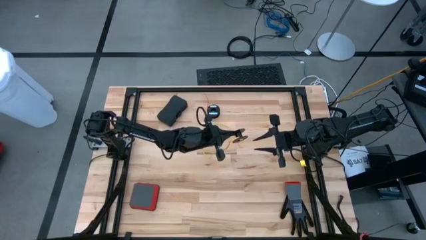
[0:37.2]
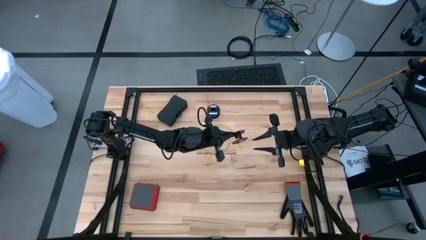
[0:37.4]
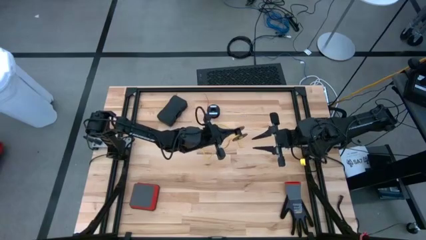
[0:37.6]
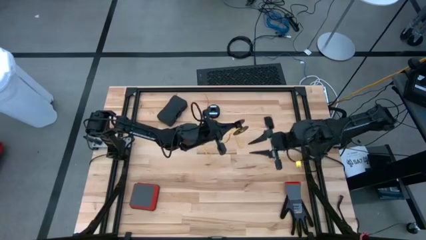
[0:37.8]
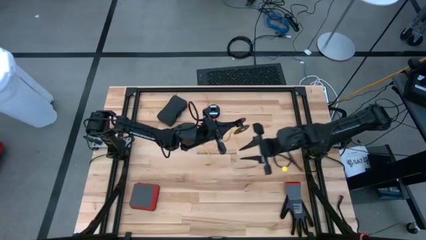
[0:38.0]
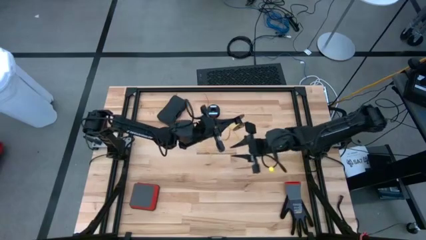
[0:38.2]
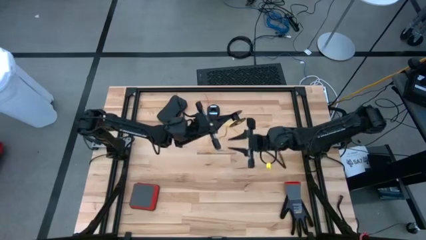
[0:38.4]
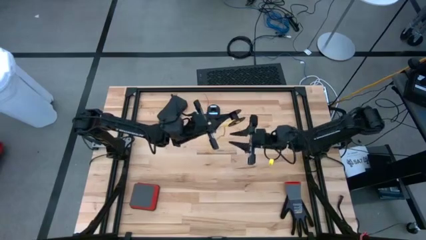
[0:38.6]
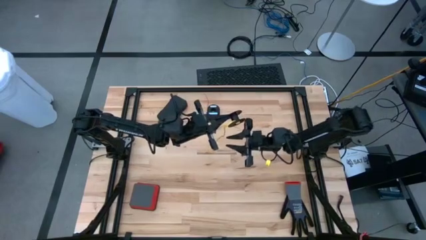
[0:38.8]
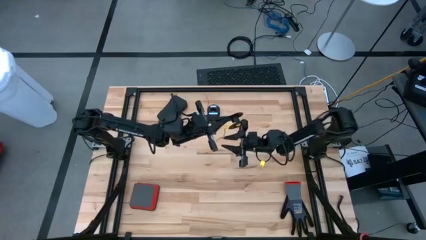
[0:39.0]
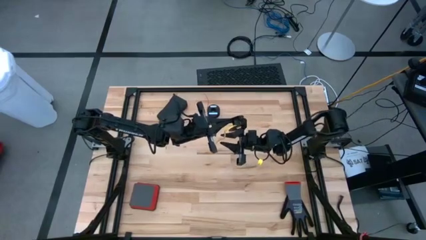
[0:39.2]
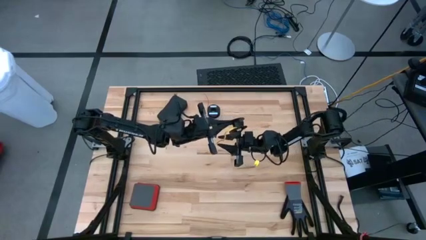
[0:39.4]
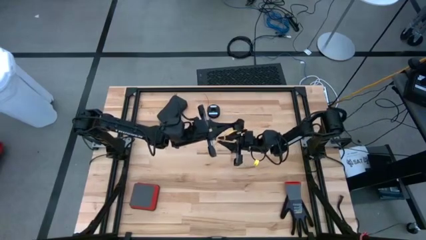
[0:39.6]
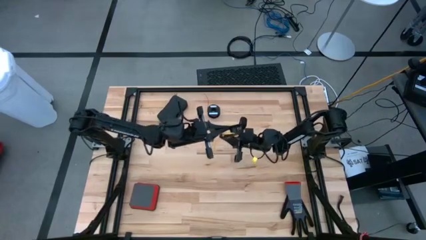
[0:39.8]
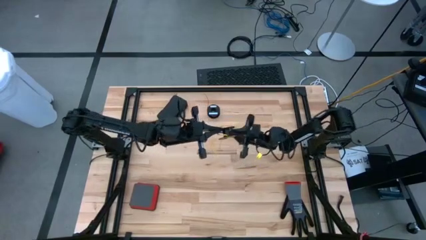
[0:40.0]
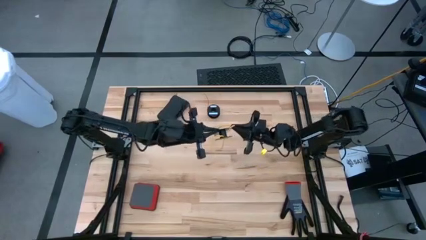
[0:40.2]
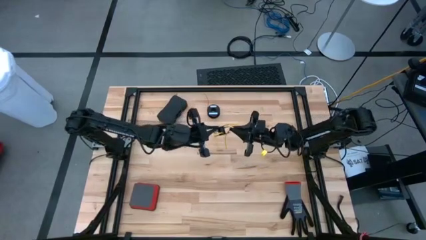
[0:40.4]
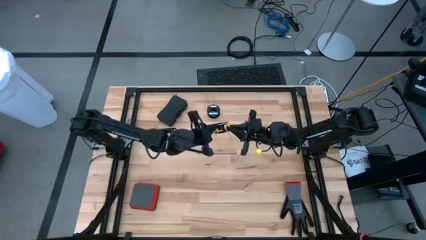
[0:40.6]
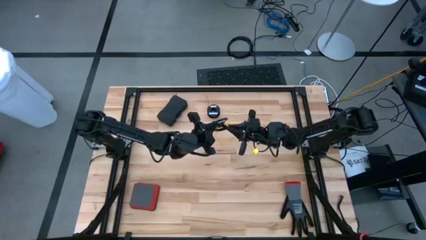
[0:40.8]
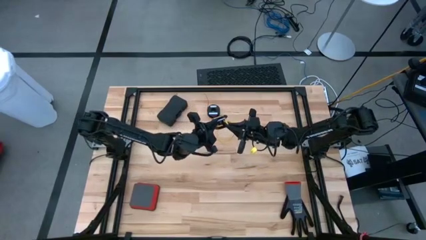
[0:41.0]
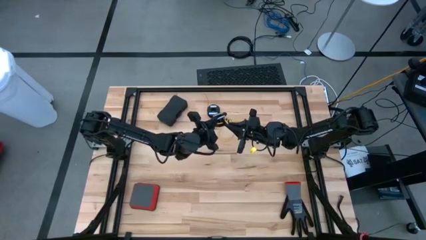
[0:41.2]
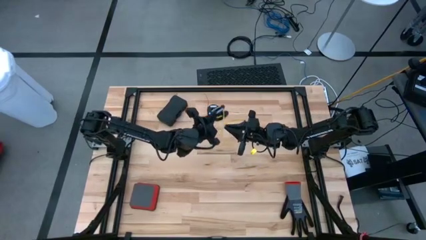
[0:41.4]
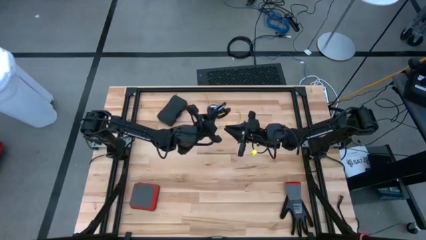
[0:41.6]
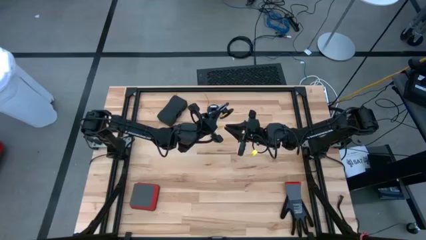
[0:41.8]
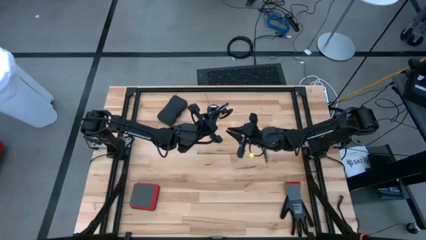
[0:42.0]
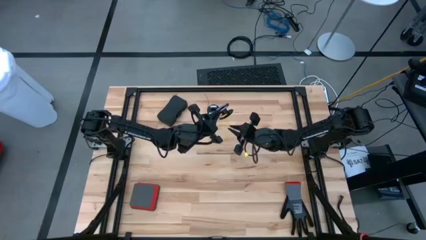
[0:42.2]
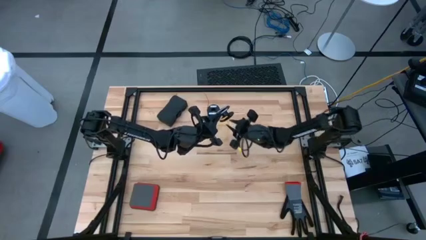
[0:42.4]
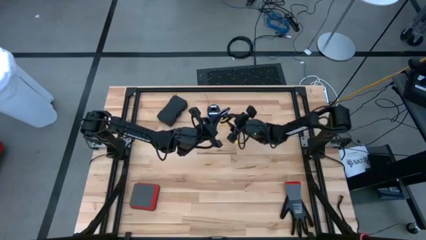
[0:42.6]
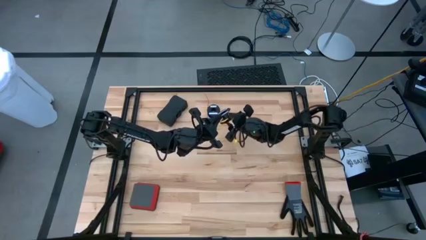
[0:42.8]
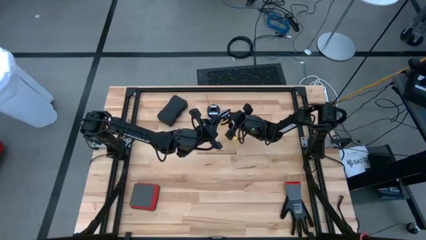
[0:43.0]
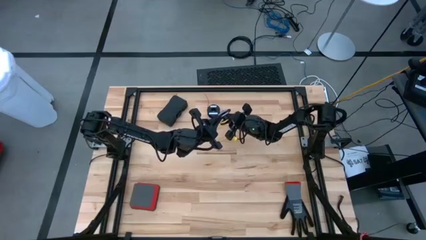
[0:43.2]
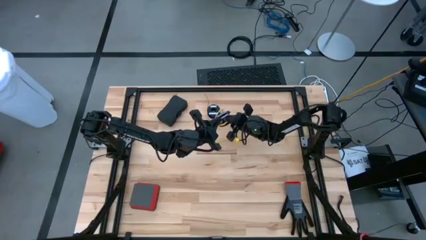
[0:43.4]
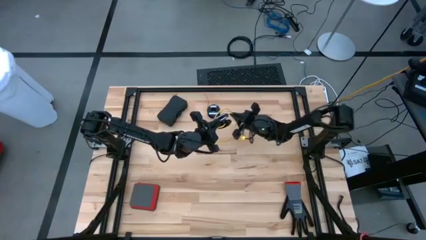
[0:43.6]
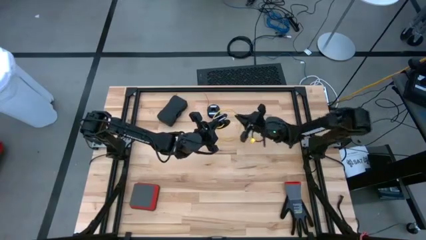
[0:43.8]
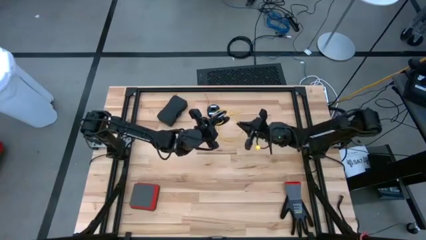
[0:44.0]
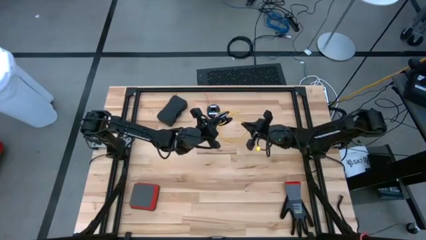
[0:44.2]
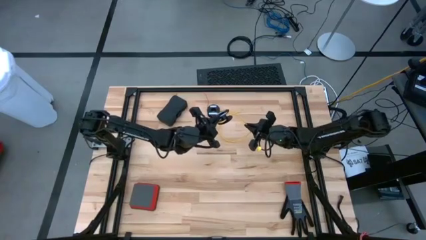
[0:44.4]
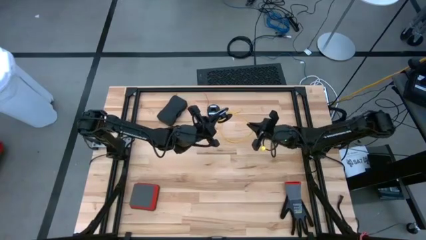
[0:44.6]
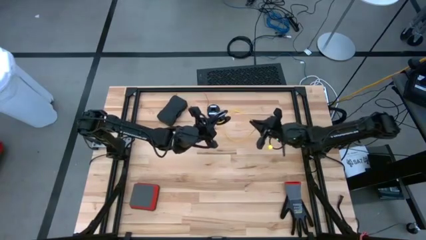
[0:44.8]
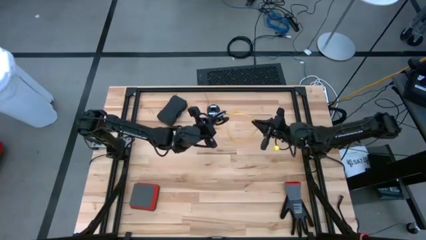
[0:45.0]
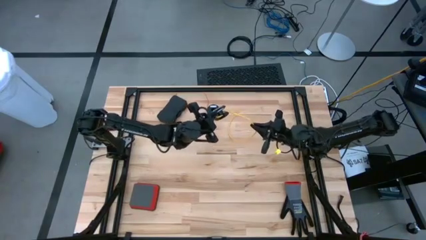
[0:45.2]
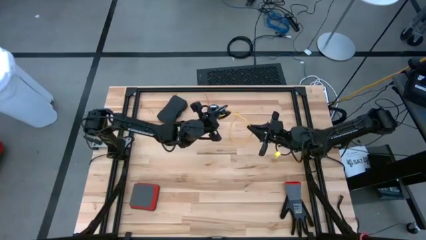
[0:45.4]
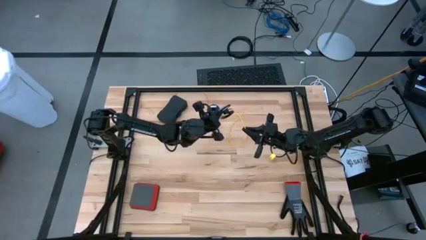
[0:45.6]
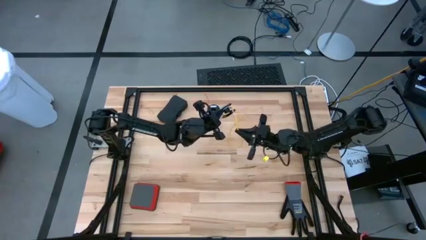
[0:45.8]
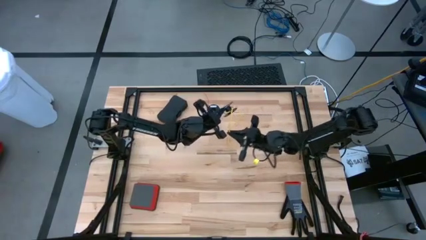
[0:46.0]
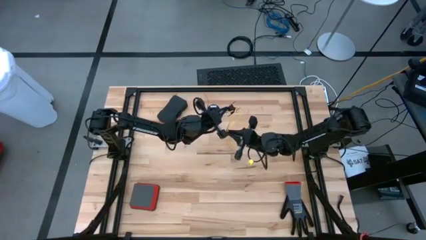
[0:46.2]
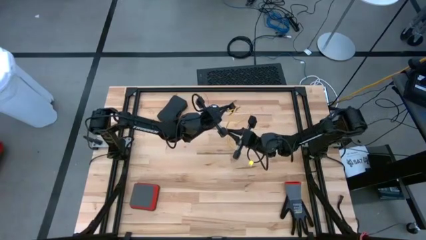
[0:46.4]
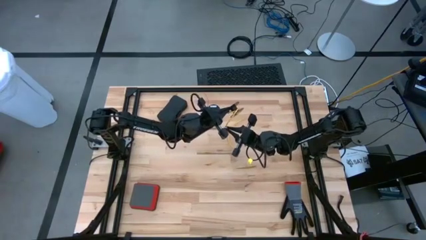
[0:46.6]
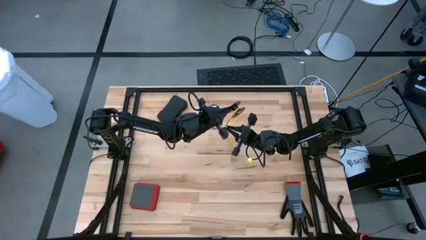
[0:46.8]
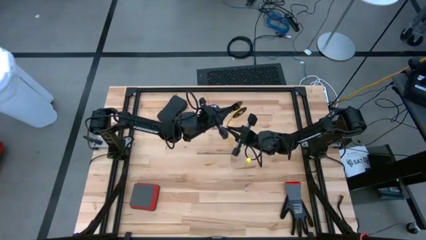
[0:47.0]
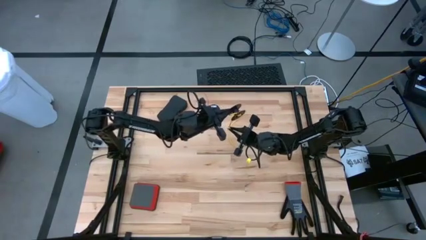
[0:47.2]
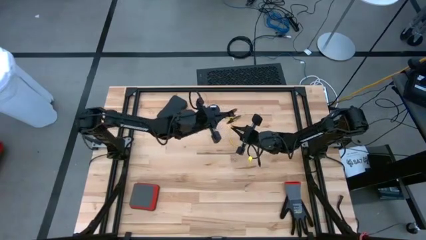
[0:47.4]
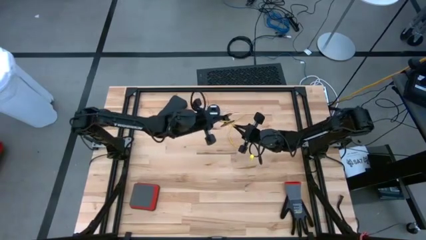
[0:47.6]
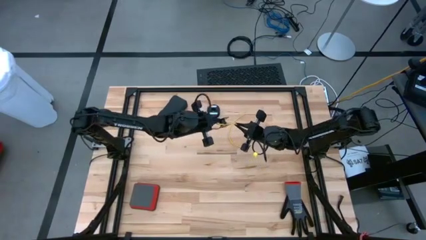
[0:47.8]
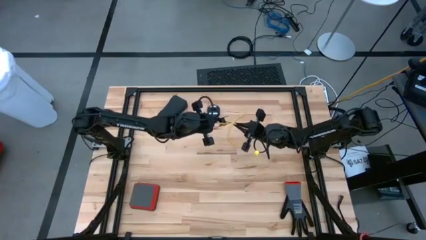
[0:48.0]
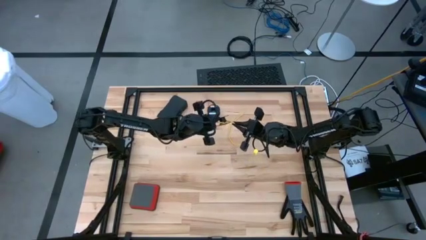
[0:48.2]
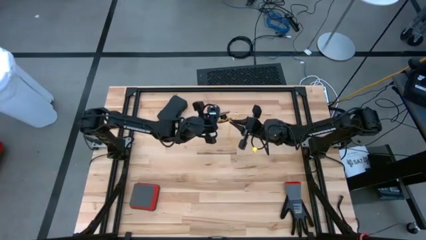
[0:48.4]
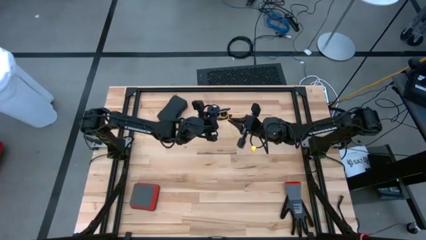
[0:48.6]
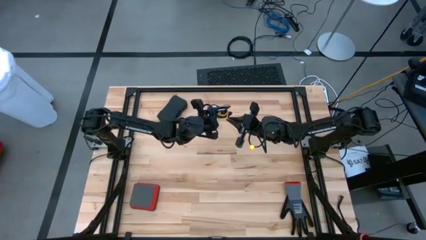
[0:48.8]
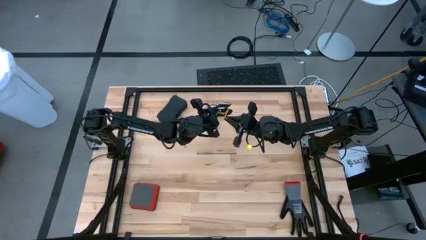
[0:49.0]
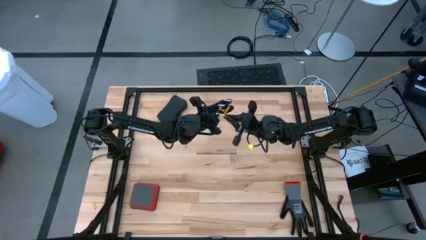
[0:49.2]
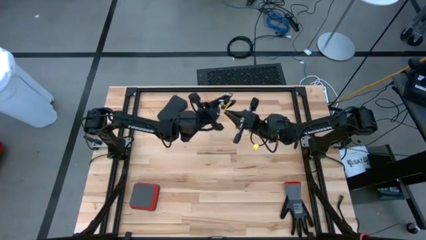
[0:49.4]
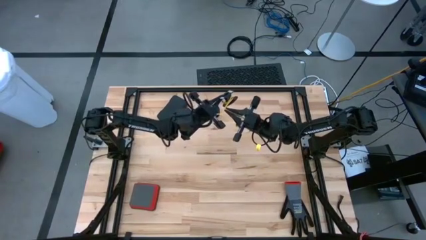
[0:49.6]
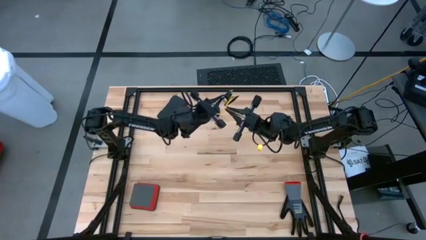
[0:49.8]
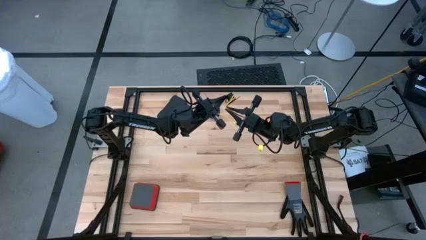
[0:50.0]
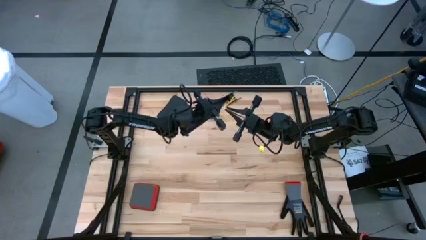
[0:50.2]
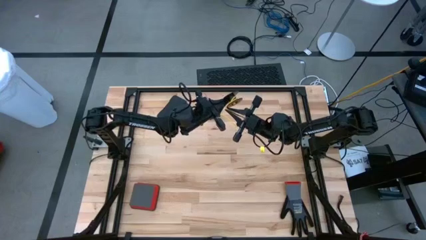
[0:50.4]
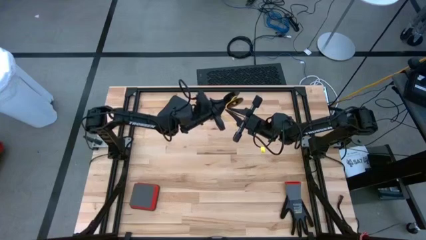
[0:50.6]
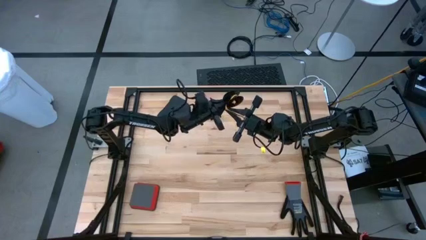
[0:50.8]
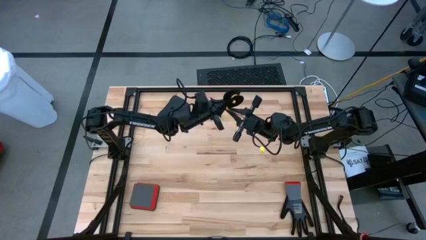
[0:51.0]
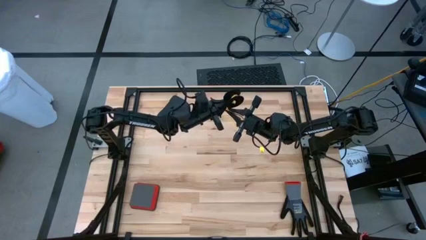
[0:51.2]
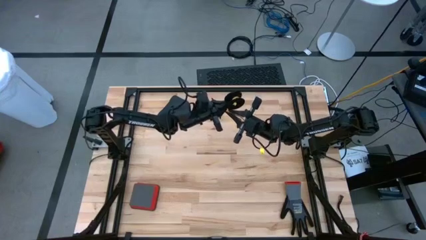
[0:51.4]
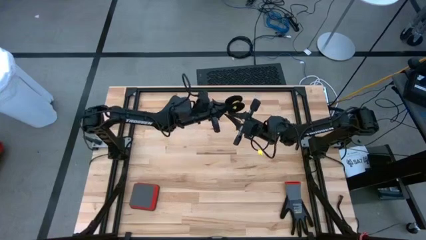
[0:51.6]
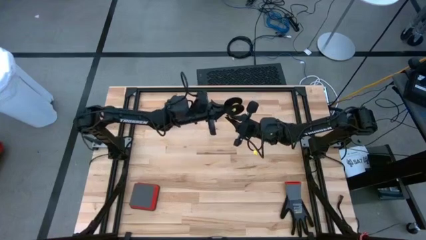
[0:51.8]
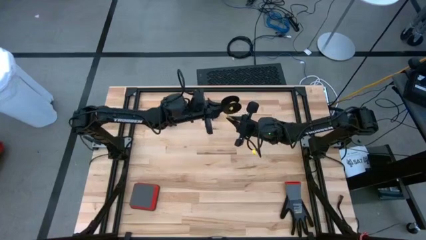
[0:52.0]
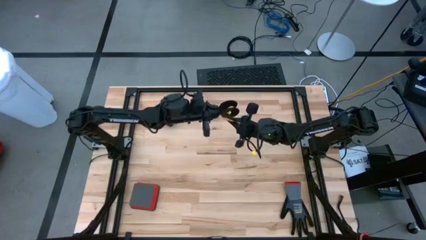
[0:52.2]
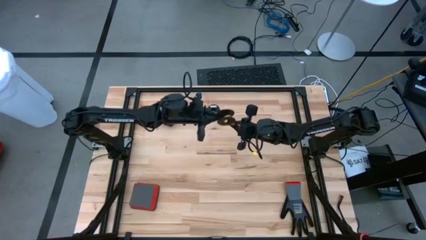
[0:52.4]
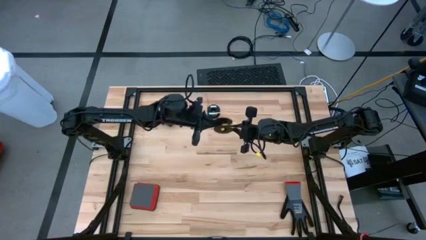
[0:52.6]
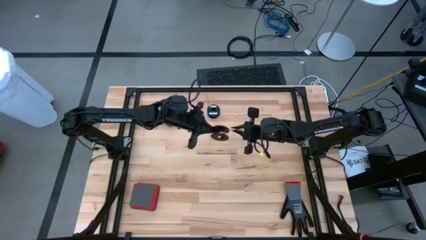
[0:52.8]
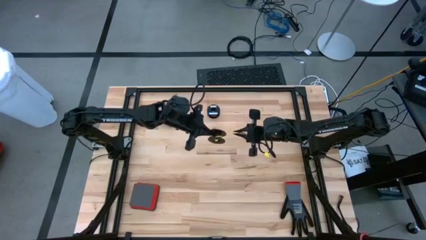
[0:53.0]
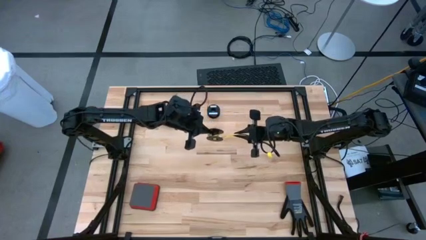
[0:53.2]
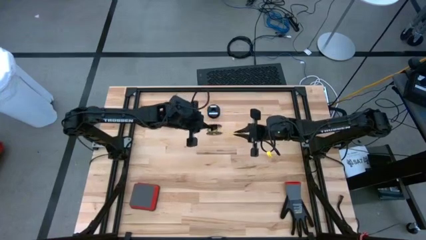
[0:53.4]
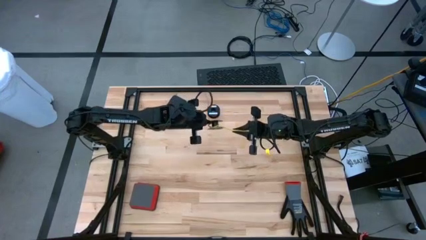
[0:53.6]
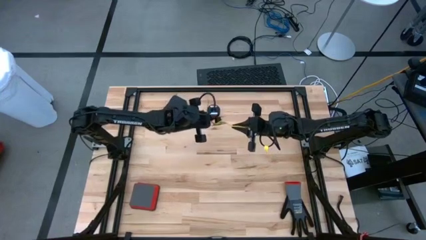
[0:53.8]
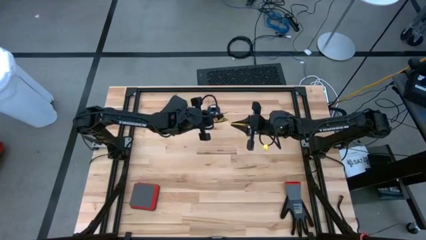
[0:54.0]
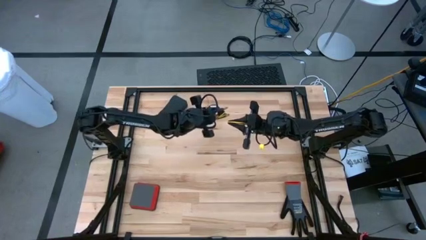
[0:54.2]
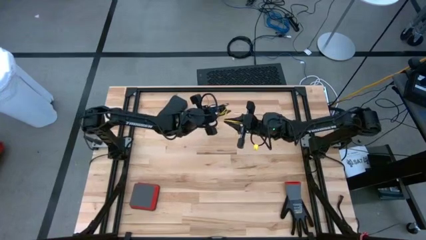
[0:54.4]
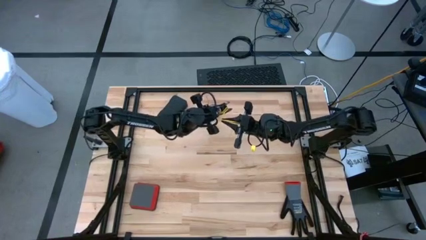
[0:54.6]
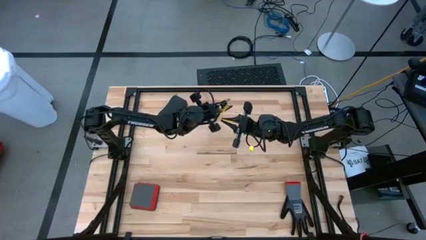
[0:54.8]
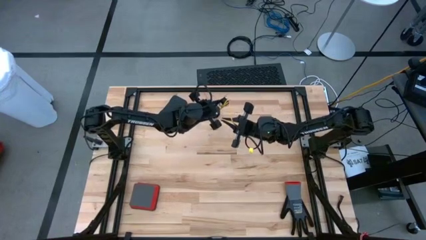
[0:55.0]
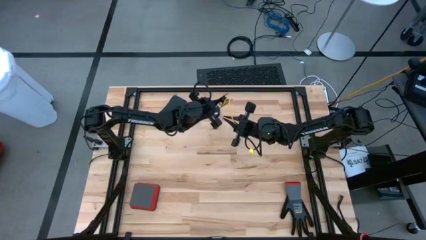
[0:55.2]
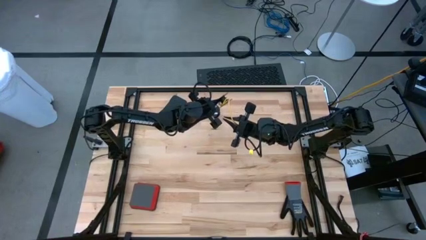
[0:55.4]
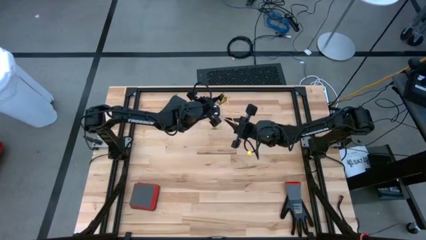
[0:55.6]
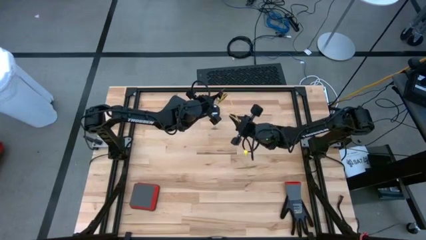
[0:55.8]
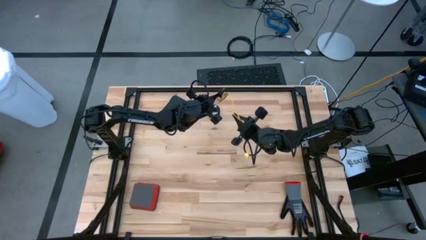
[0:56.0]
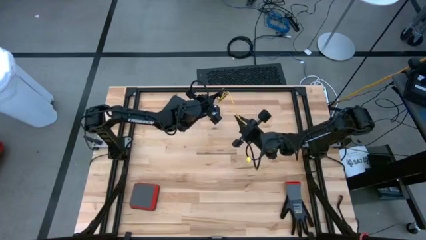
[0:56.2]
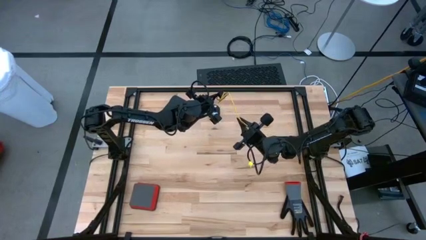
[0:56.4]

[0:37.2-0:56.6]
Task: Coil cords
Coil the yellow wire onto the black spool
